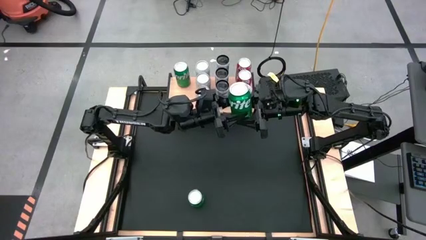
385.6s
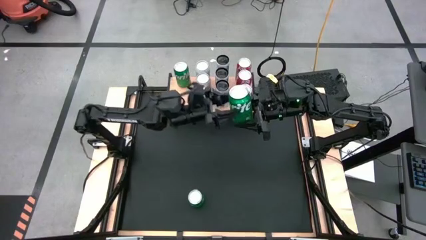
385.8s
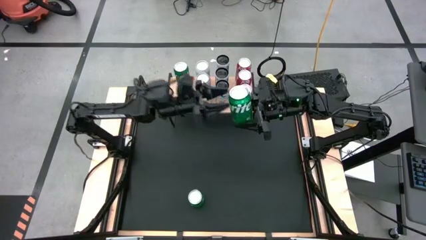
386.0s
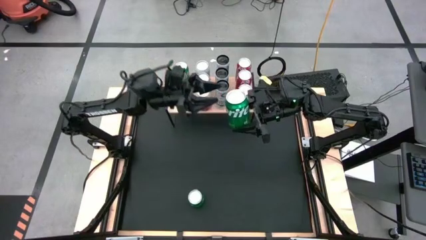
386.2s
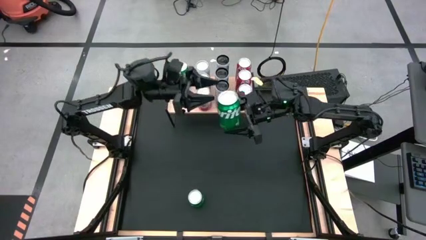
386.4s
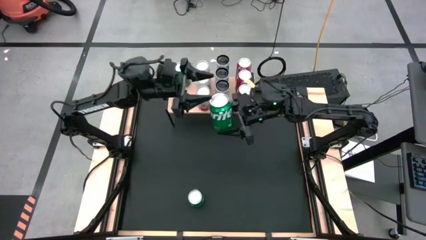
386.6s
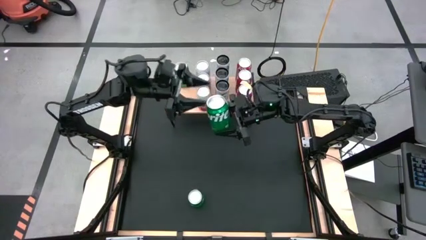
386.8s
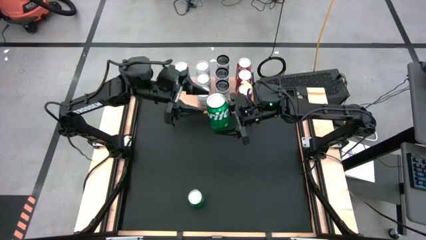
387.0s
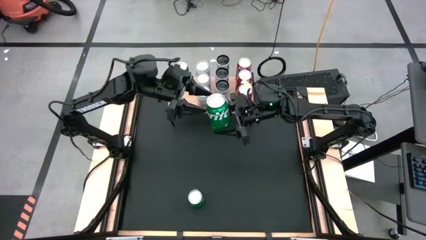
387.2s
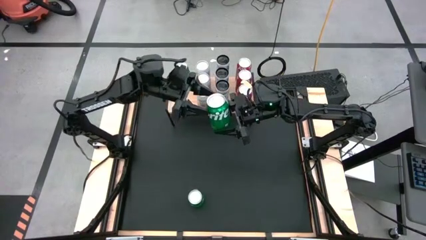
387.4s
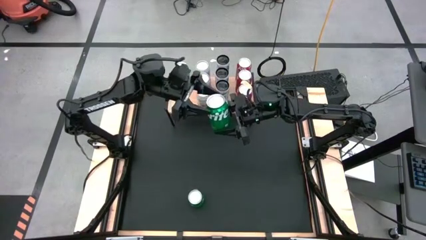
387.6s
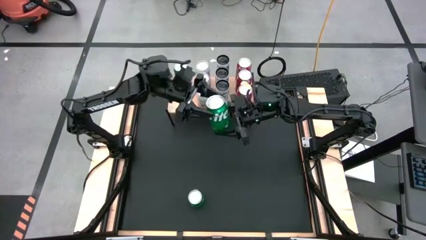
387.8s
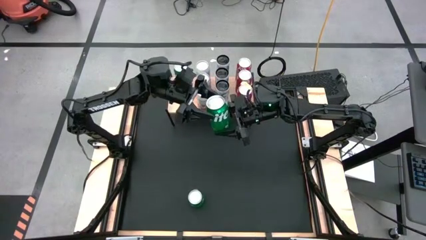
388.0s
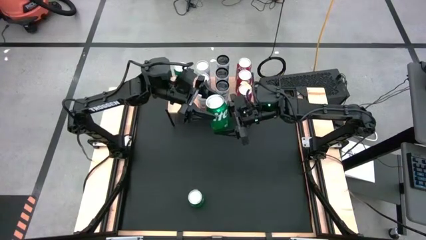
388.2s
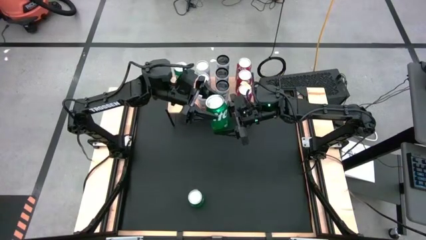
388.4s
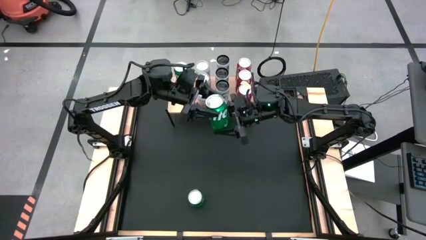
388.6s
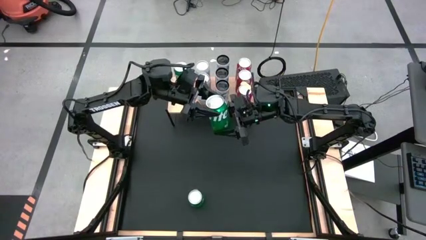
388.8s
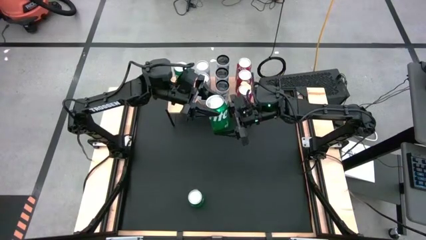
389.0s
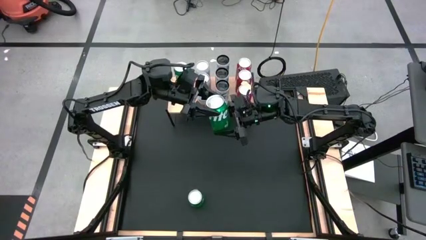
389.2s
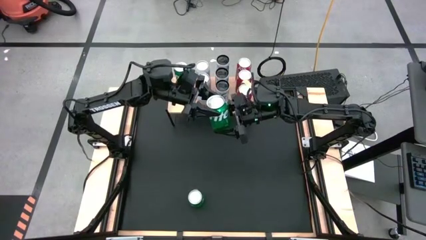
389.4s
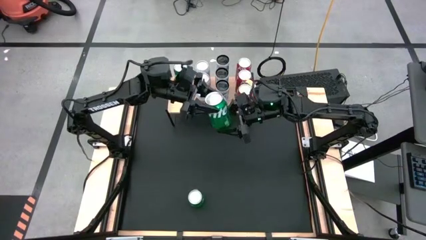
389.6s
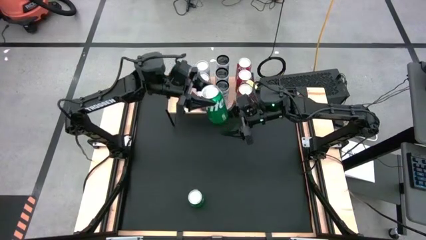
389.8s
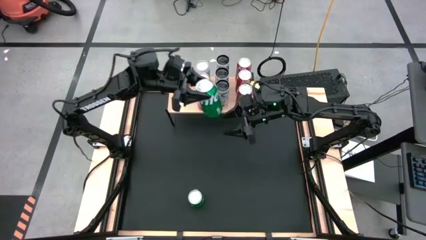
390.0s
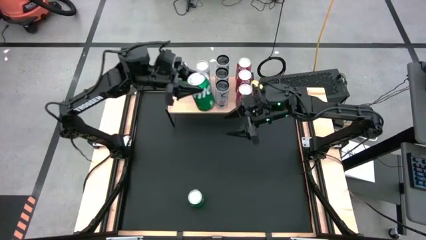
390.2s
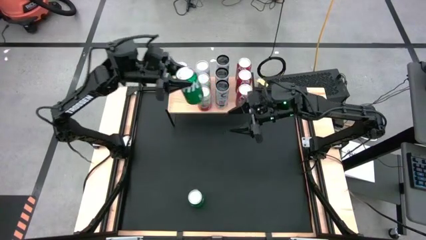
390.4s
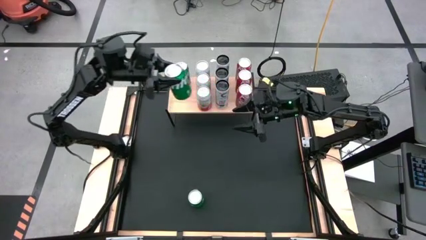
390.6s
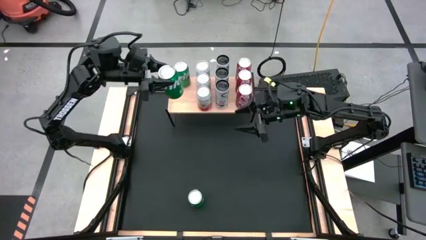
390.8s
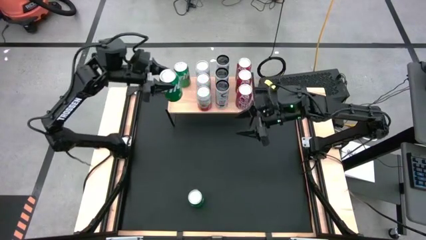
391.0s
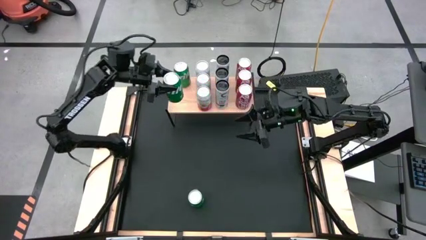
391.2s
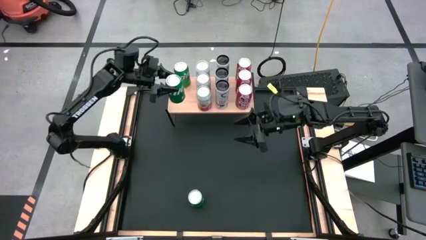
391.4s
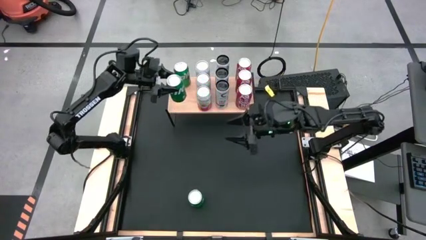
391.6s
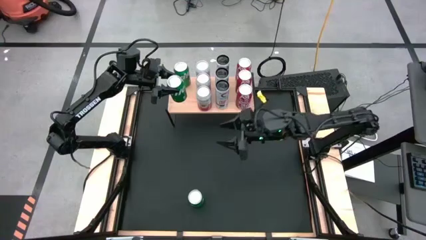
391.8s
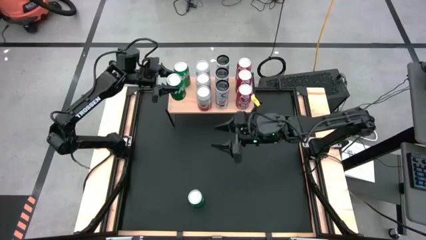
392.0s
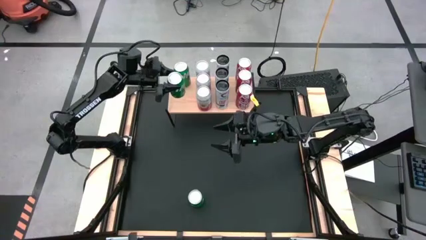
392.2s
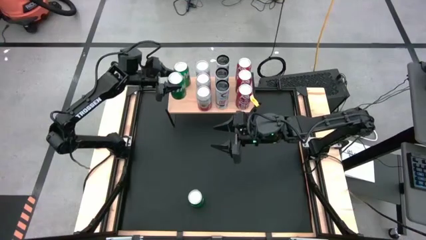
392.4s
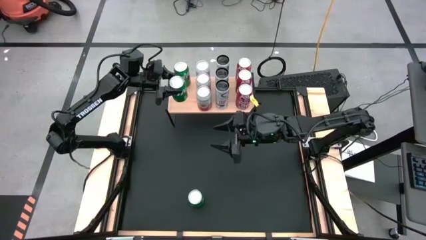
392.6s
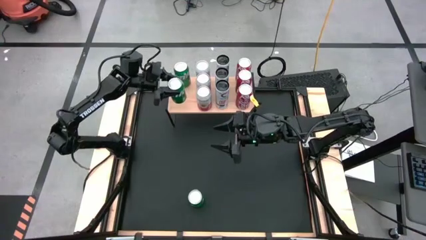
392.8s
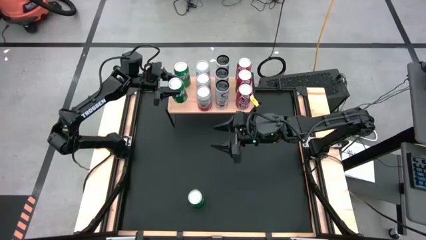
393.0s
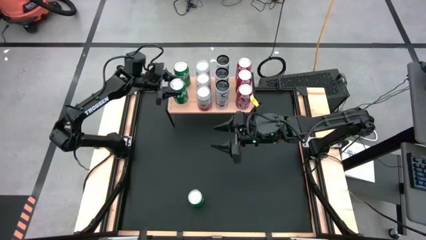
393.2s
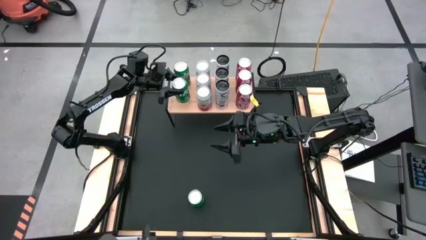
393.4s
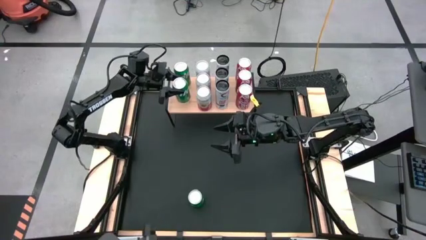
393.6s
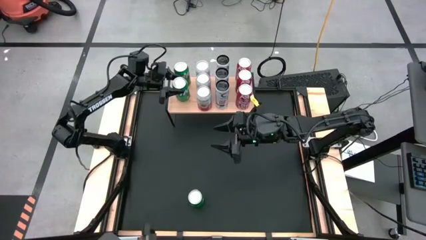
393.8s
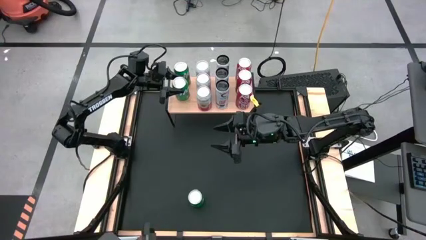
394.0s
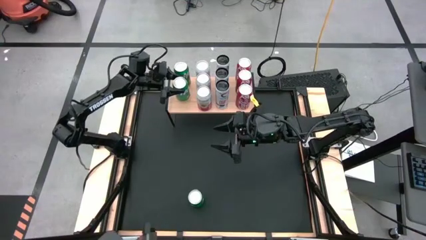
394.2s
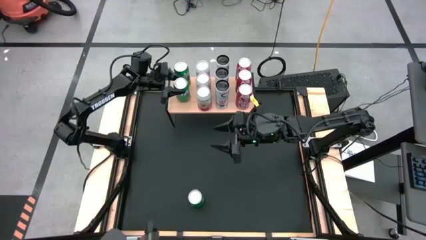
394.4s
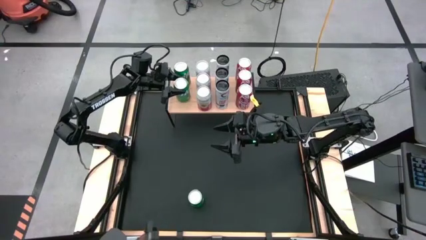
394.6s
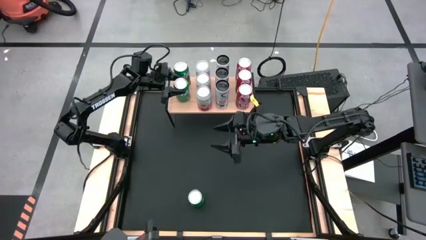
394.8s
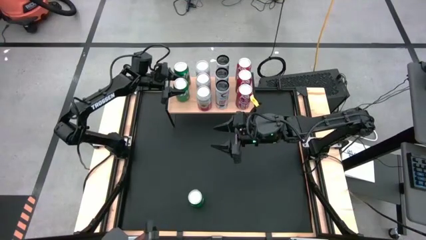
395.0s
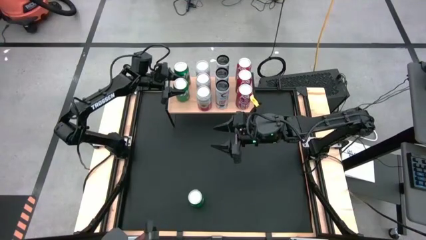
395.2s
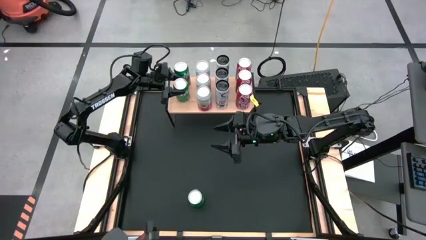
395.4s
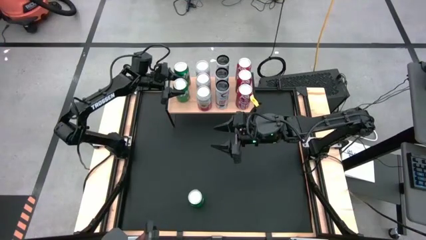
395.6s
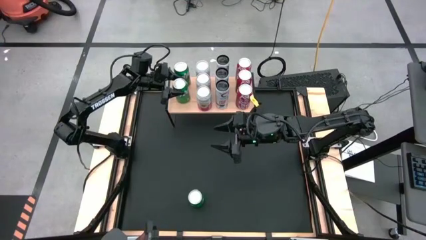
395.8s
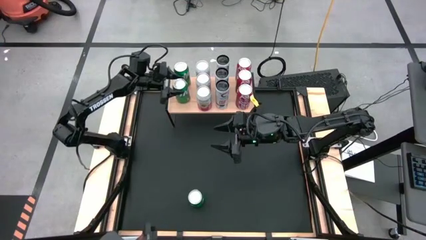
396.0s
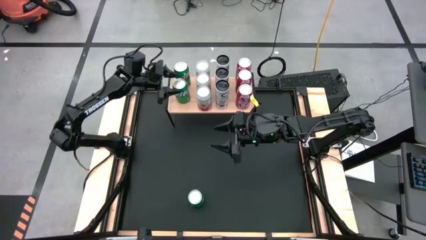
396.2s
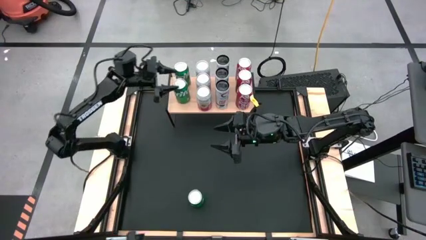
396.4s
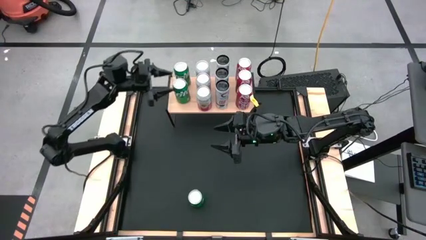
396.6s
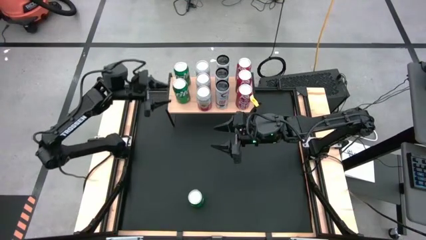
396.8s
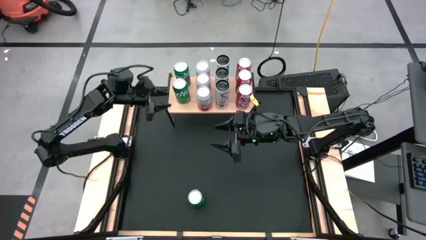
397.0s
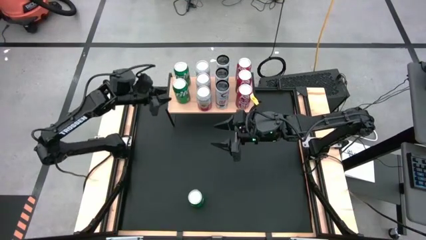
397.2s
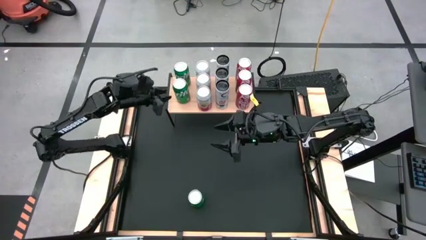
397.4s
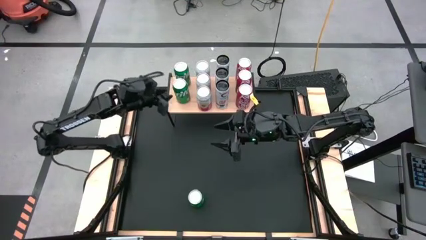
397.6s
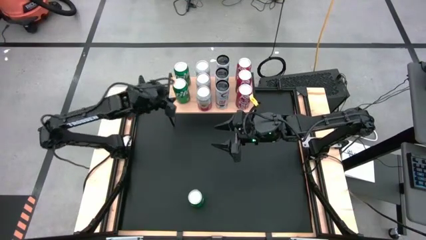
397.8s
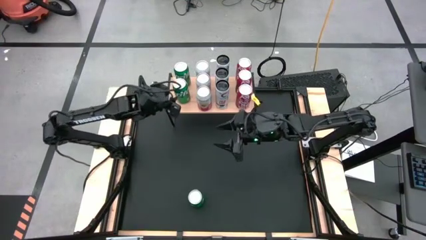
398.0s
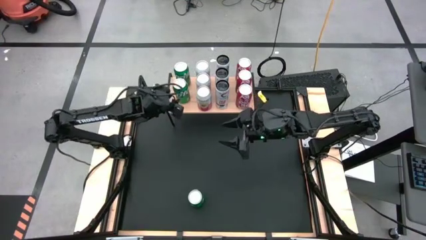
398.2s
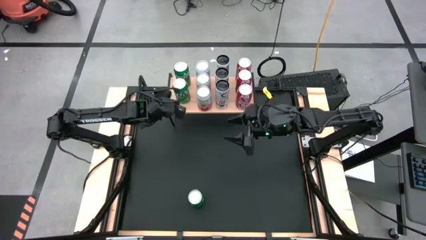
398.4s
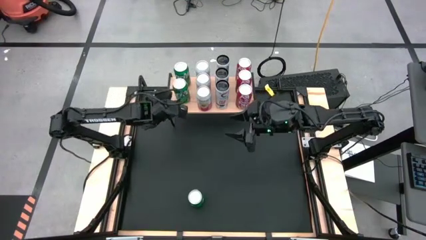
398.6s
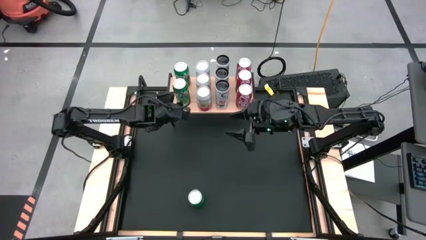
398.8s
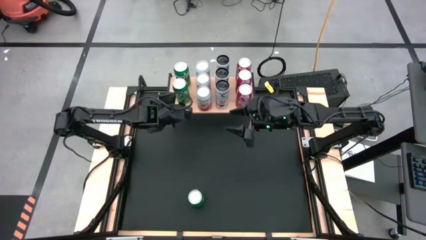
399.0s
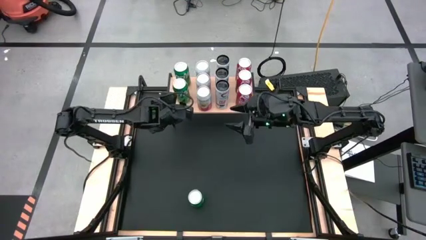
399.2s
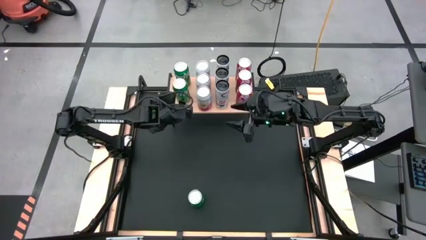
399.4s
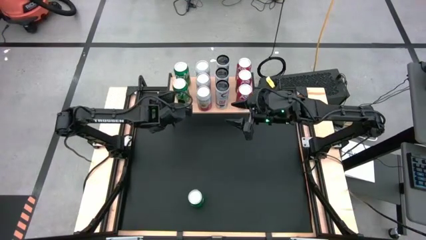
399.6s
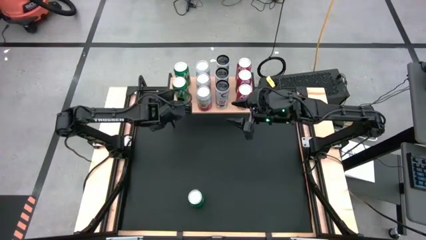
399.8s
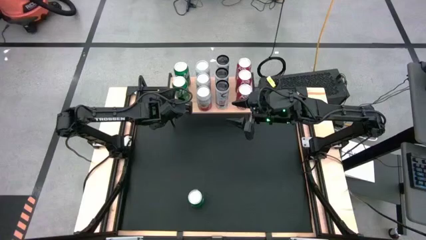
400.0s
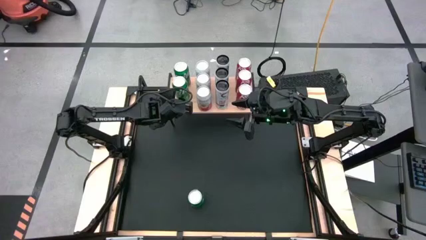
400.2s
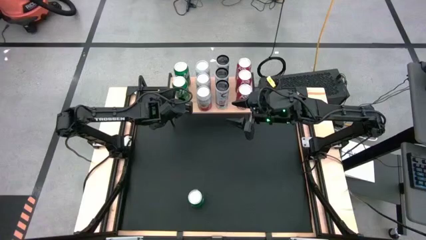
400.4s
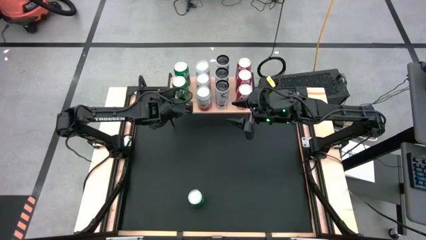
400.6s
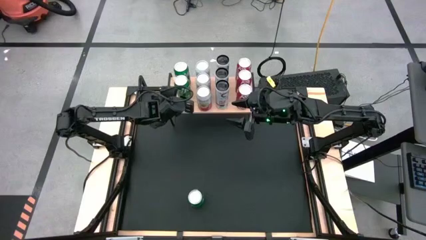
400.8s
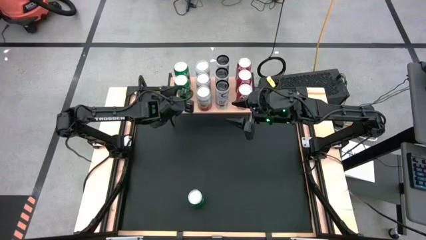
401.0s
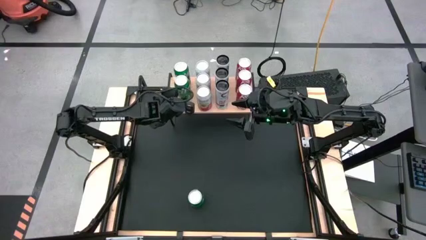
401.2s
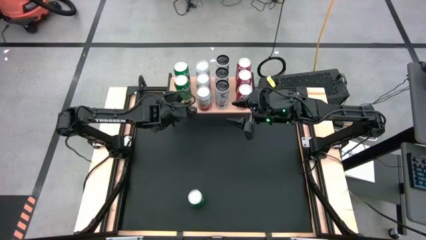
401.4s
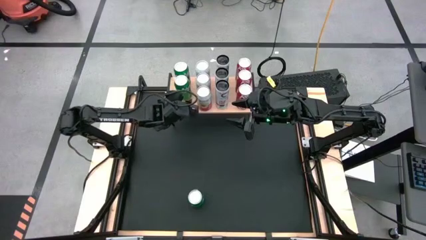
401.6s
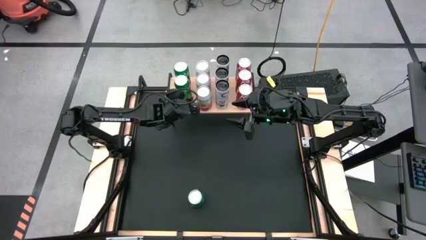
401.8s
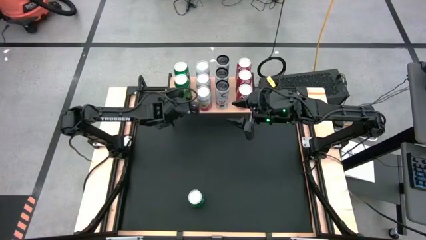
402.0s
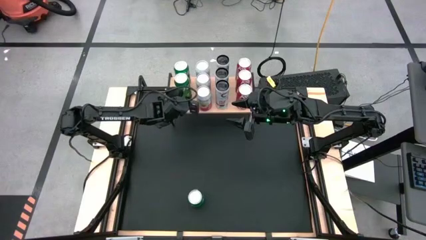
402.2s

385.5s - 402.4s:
Task: Place canned beverage on shelf
Put the top green soda can aligned with the other green soda can on the shelf
